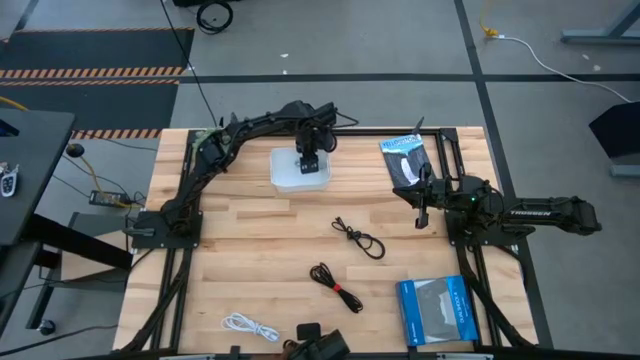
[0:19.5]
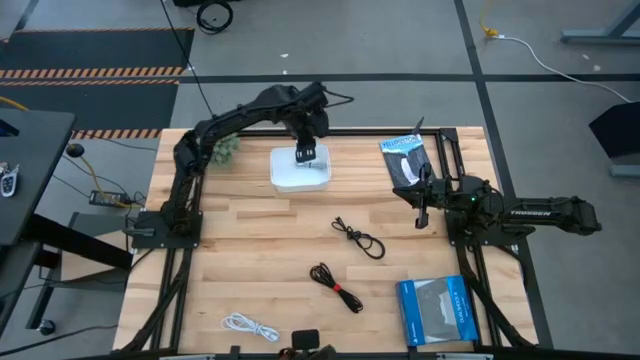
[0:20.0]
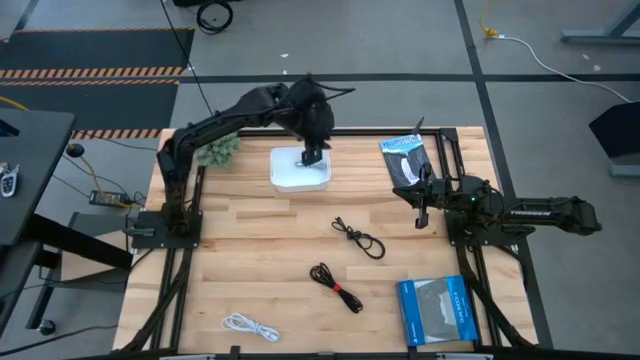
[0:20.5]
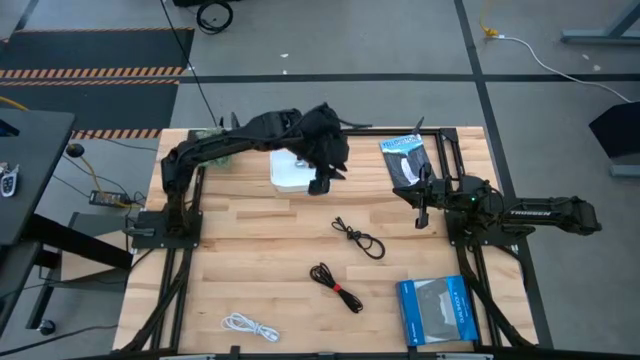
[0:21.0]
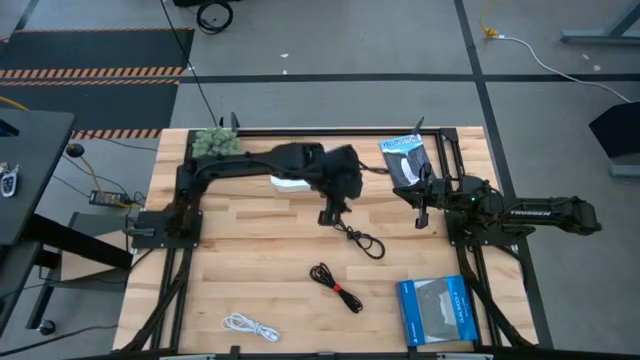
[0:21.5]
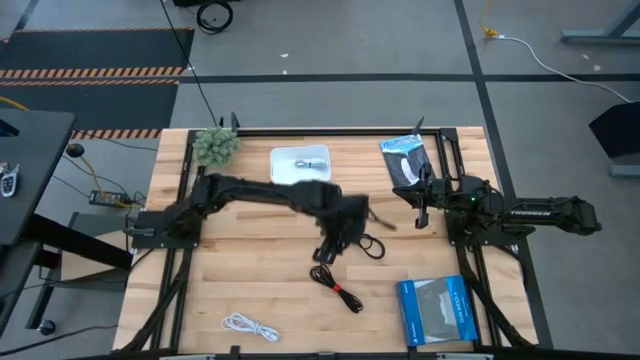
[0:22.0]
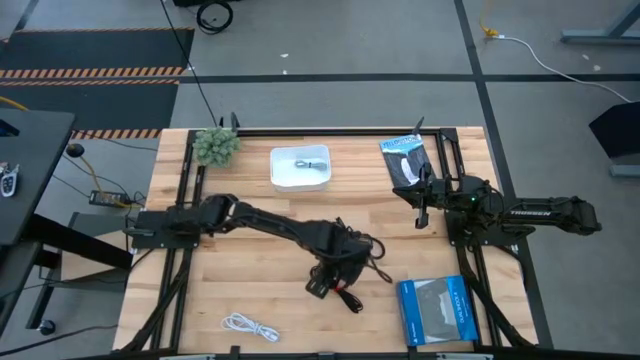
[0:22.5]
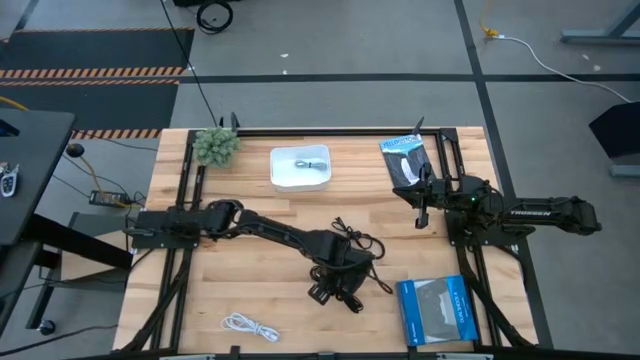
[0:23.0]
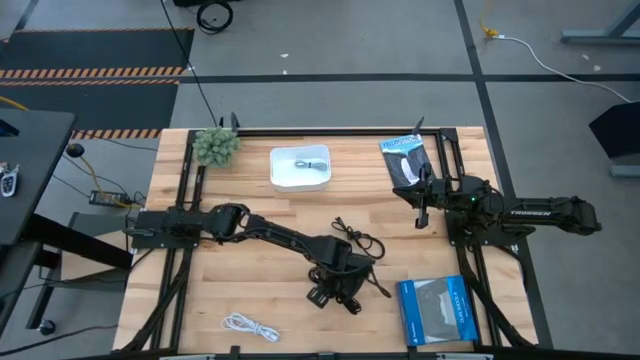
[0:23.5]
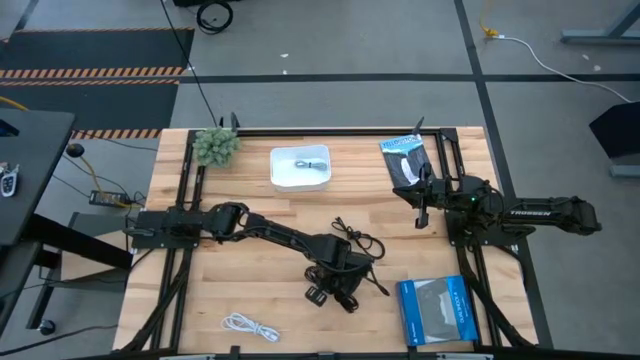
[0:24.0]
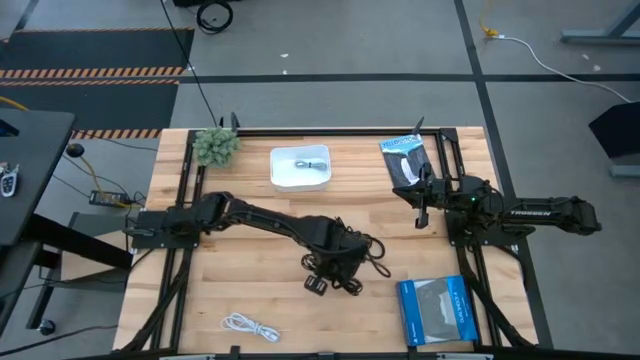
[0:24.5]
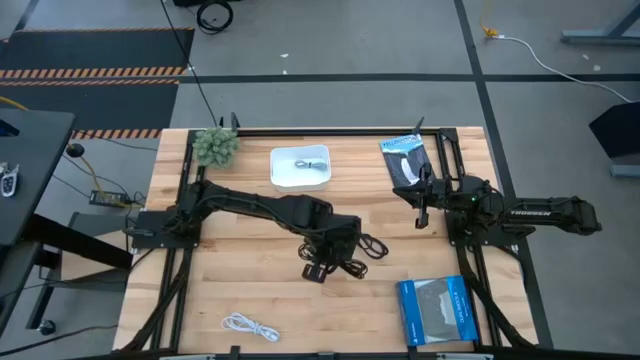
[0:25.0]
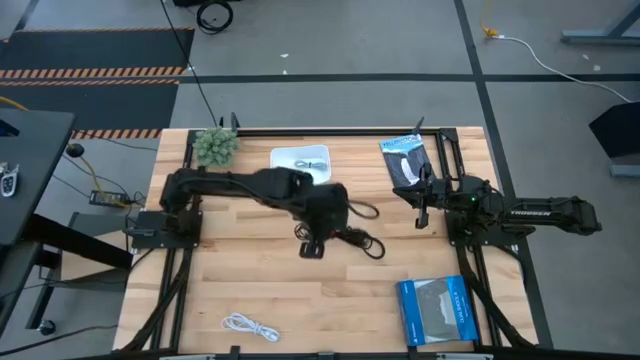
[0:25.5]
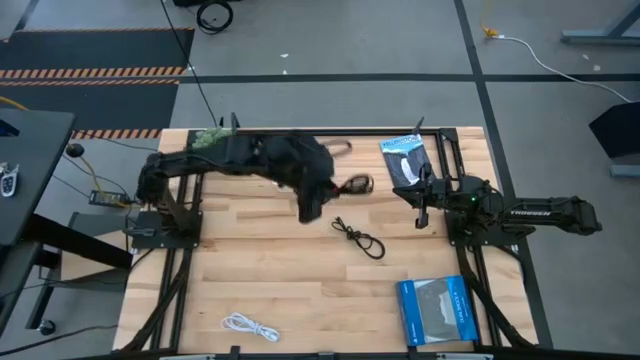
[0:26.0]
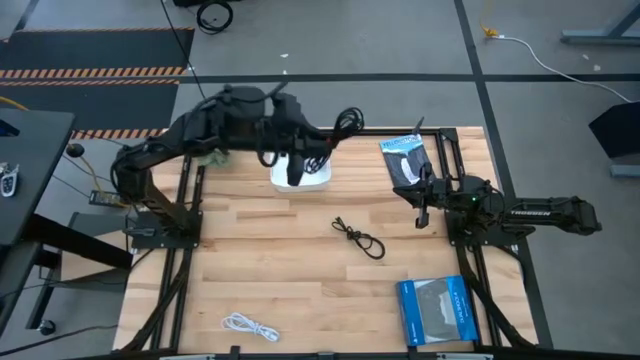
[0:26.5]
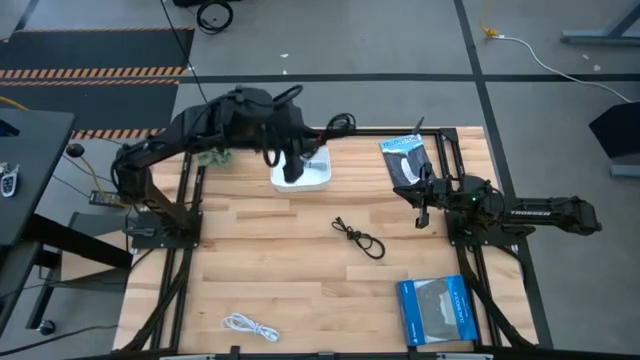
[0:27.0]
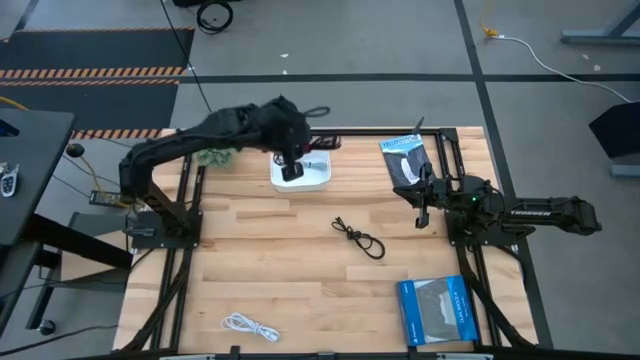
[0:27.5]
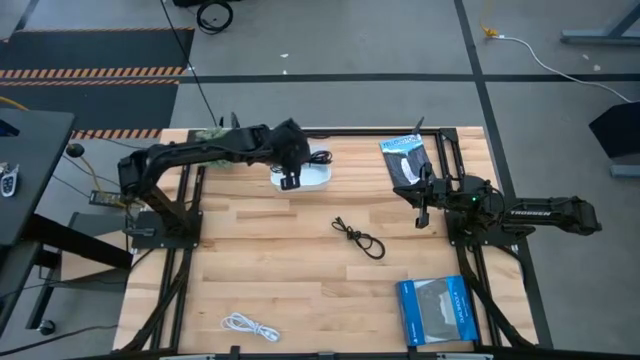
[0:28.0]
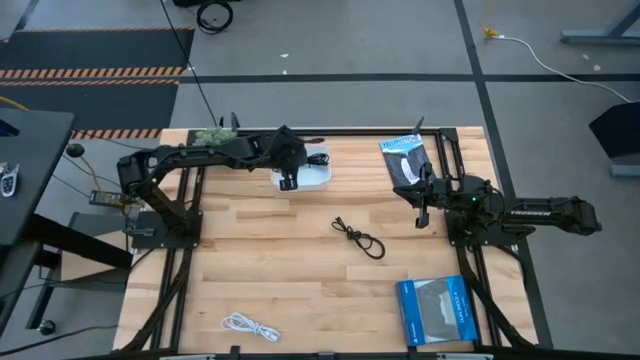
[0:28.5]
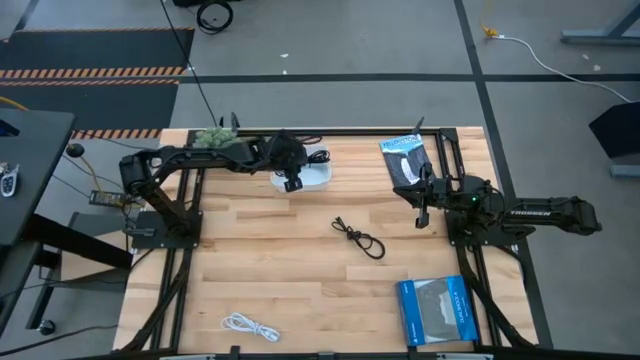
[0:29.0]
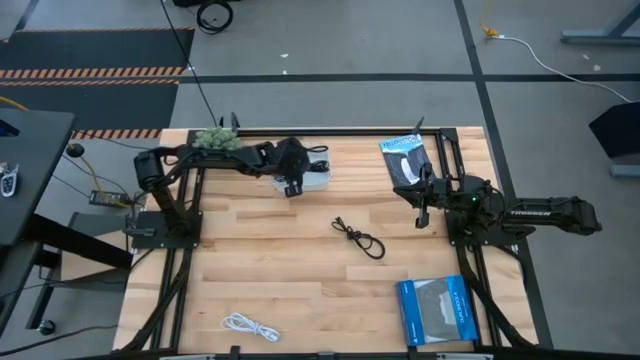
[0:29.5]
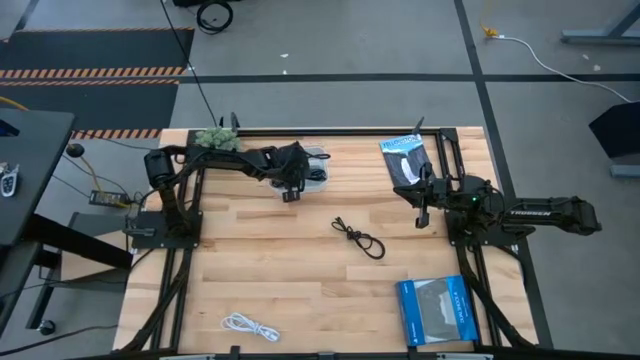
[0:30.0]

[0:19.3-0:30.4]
Task: Pick and place USB-C Cables
Put the bottom black charger cable into the white bin

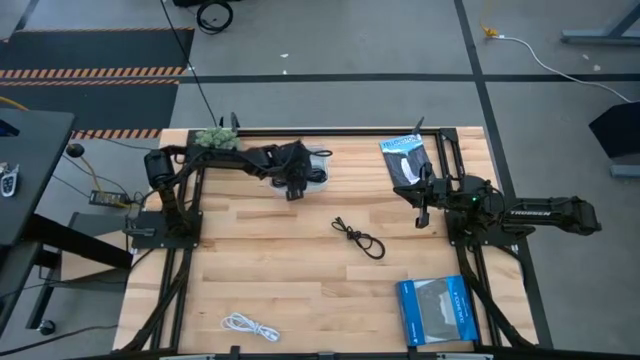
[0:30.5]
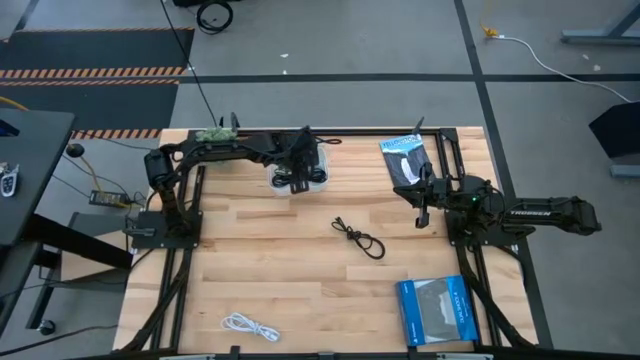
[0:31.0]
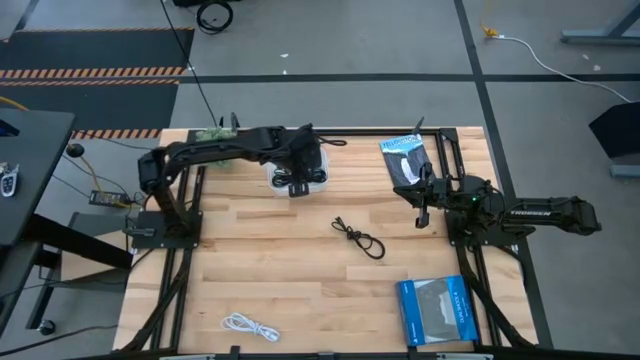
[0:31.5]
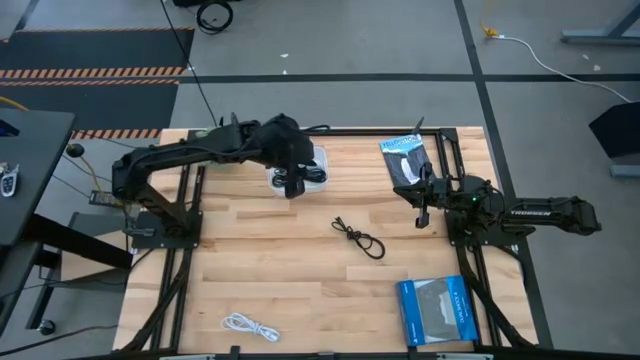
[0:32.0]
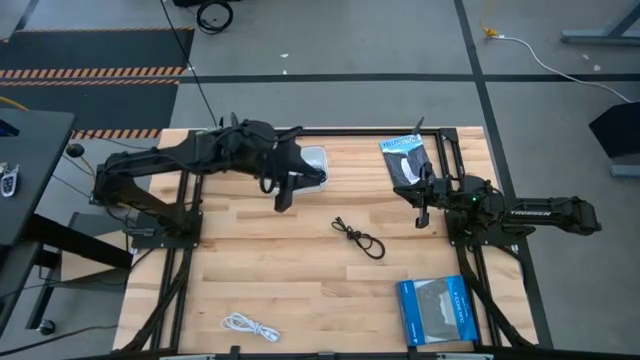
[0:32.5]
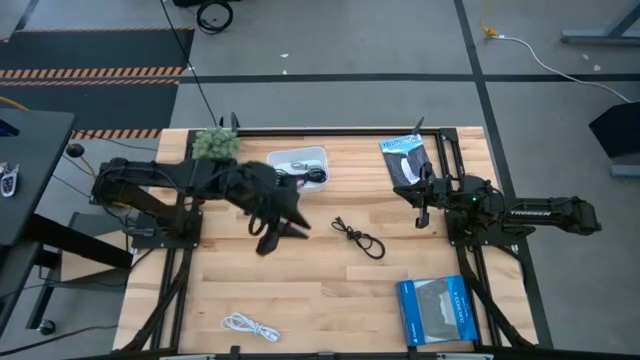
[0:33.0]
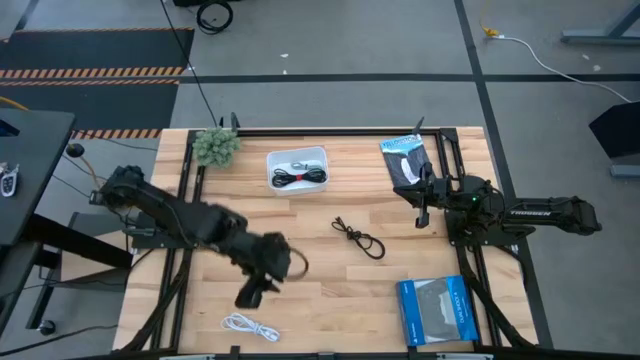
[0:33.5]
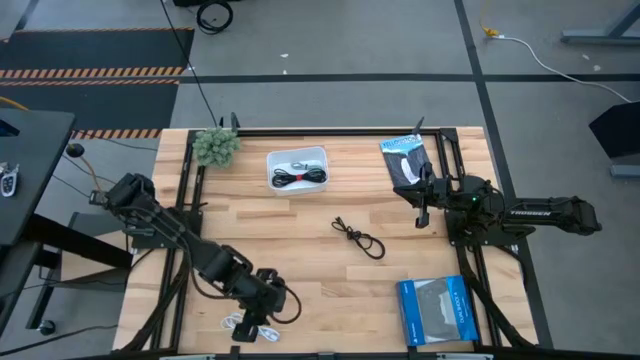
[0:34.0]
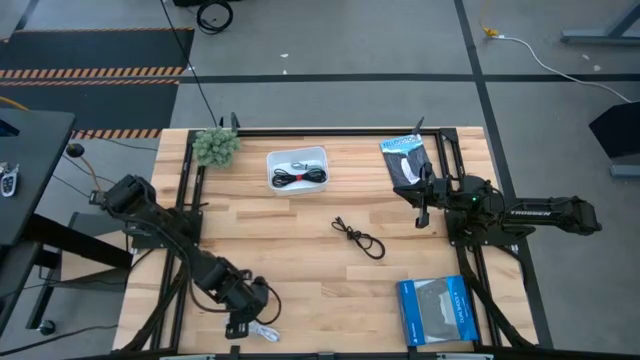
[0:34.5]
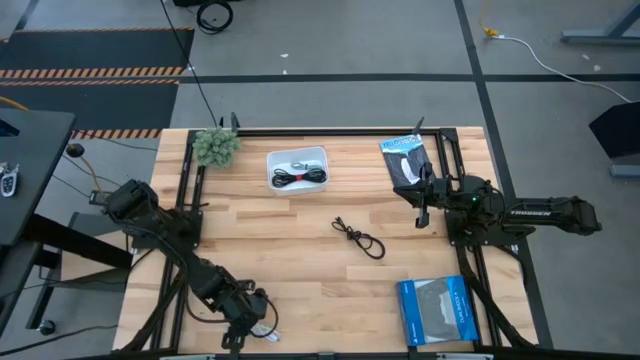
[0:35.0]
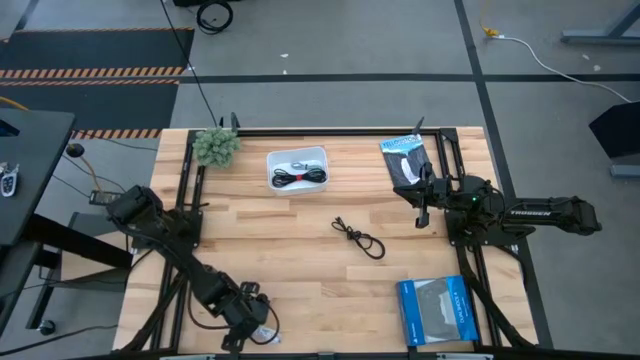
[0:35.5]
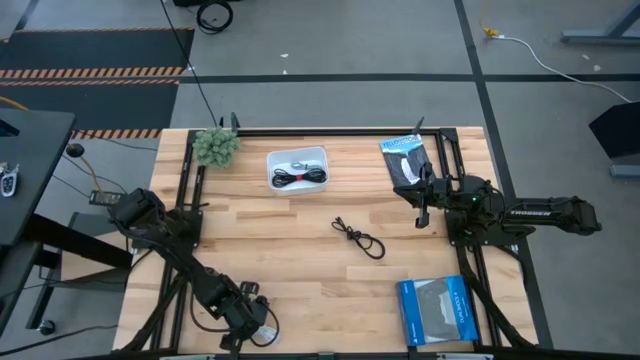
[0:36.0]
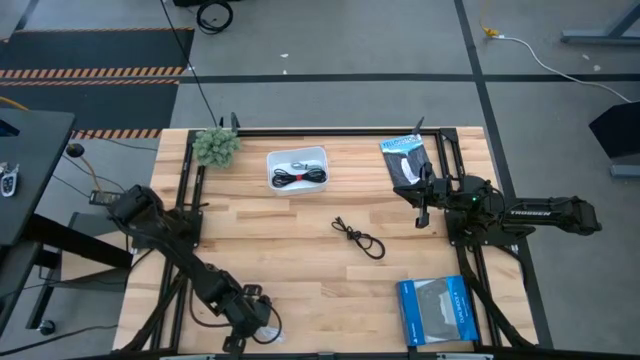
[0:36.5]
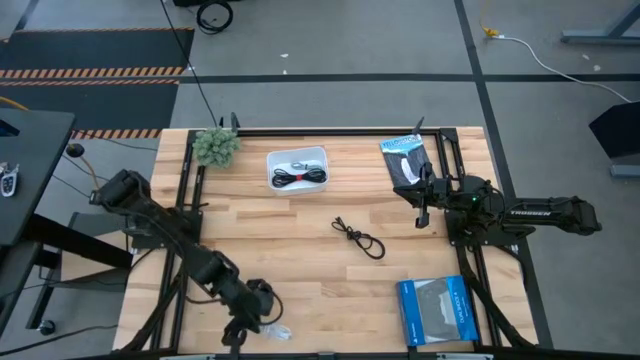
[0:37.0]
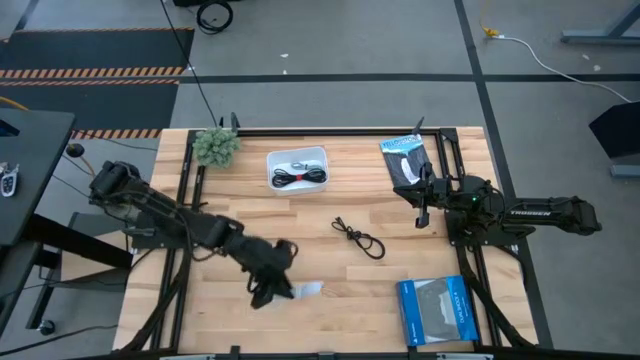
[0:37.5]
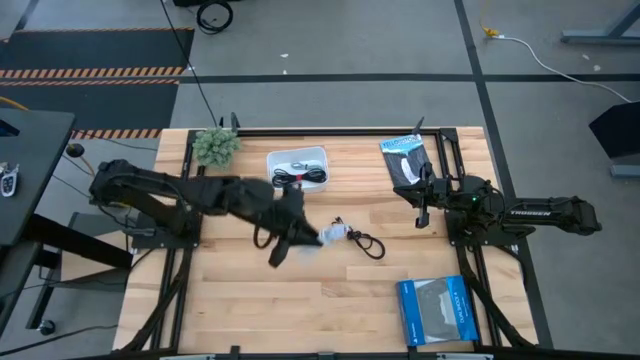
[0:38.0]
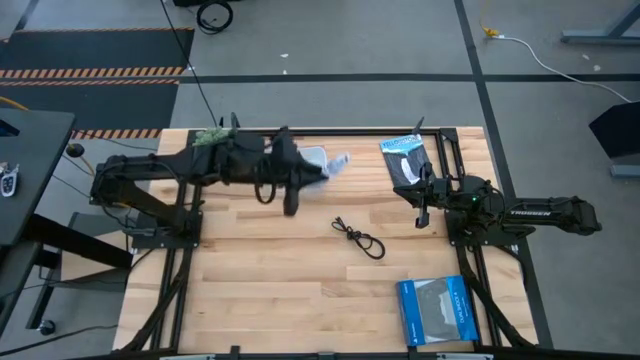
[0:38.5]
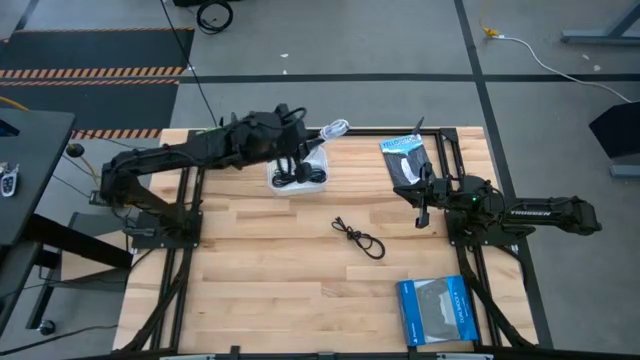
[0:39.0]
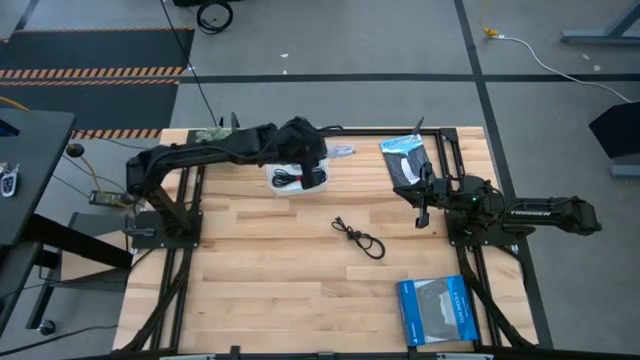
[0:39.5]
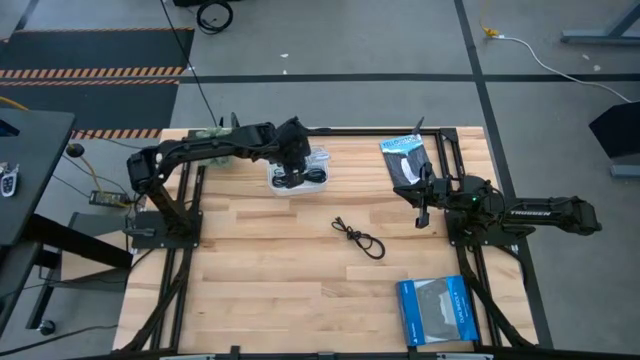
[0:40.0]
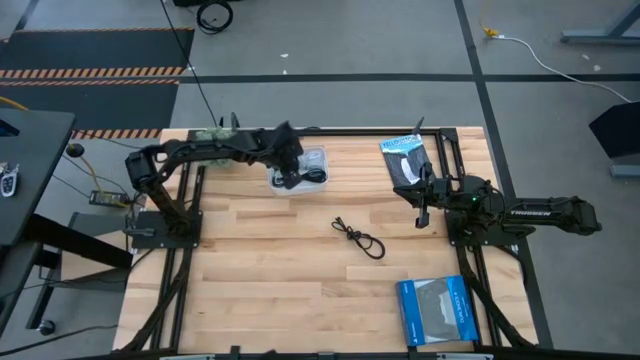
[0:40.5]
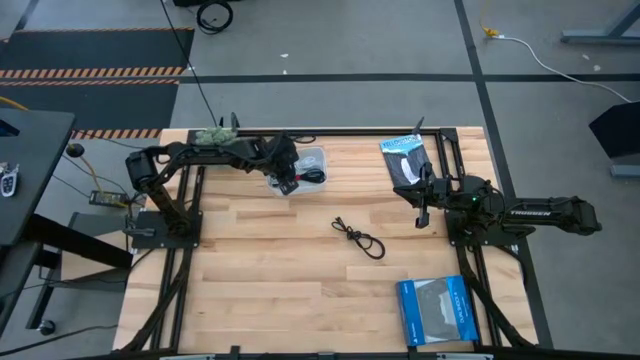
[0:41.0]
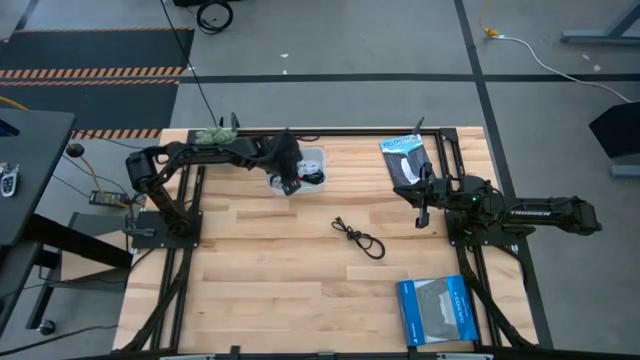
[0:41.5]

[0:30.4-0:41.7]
Put the white charger cable into the white bin
